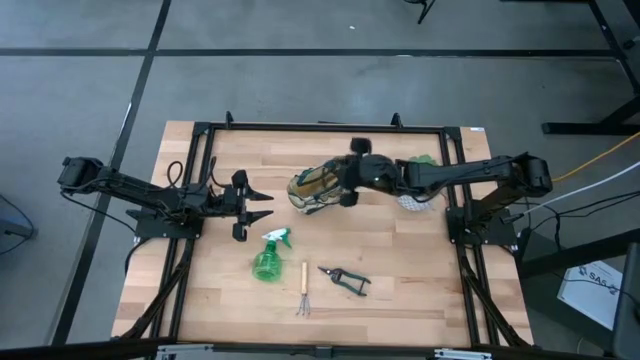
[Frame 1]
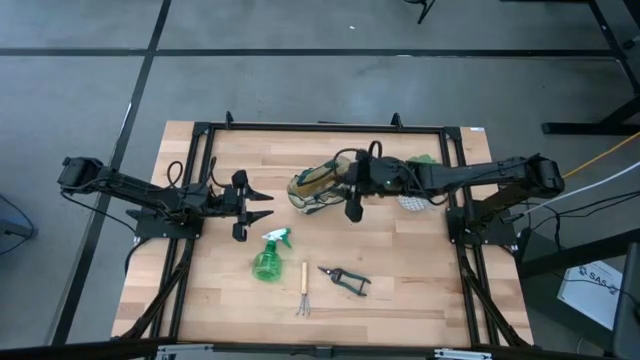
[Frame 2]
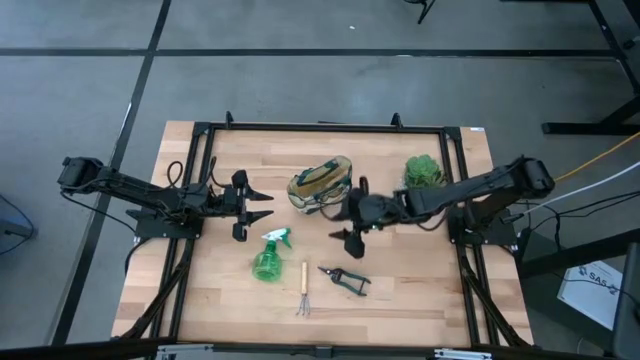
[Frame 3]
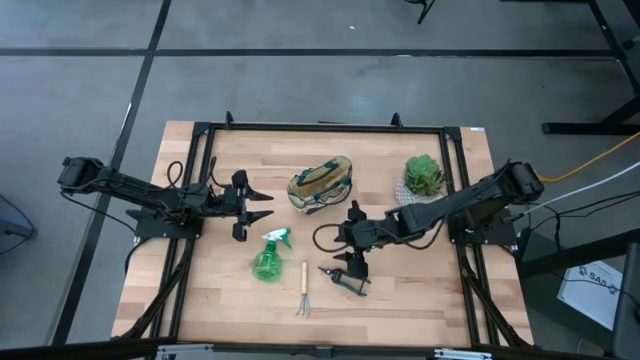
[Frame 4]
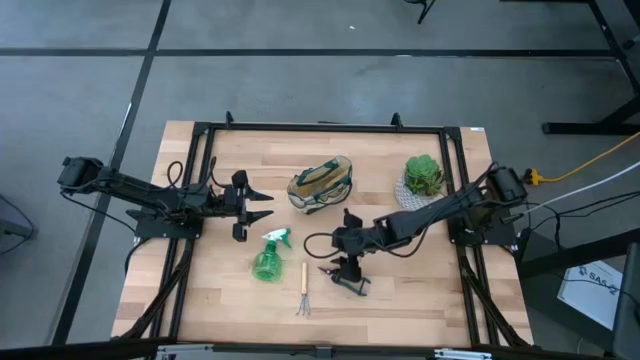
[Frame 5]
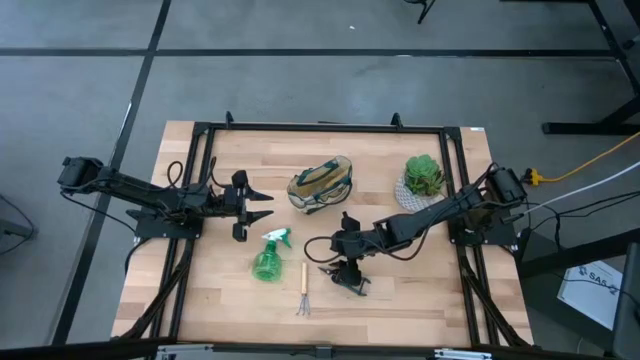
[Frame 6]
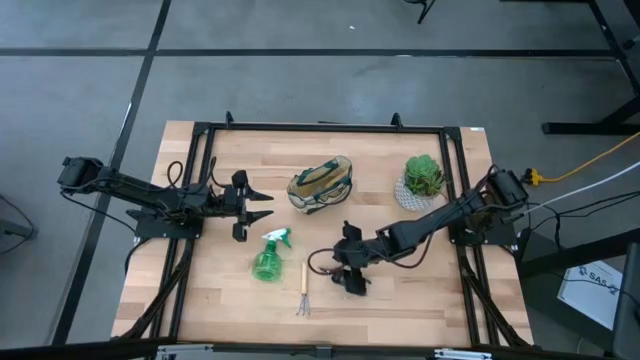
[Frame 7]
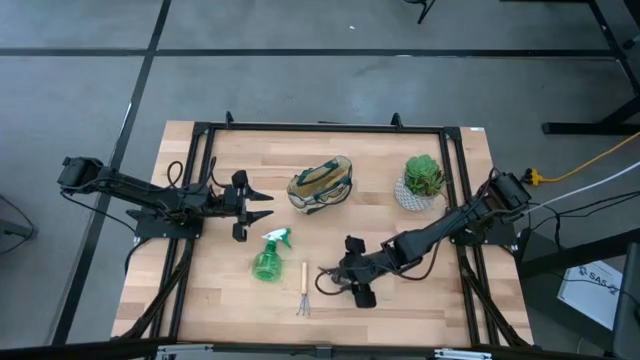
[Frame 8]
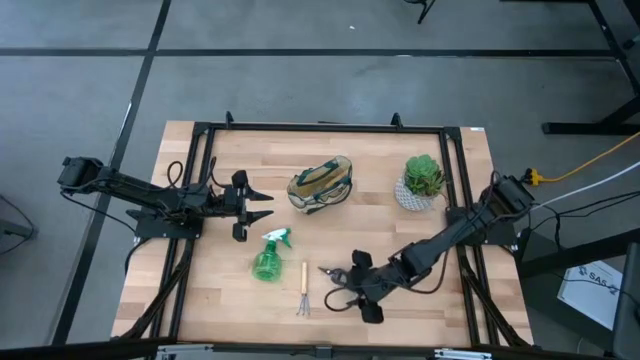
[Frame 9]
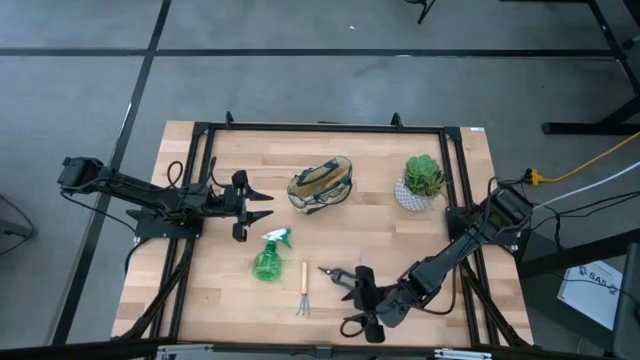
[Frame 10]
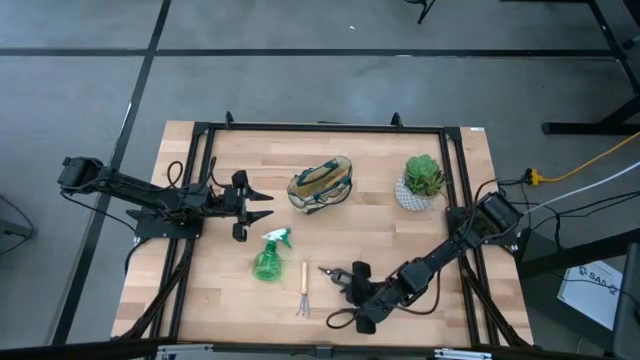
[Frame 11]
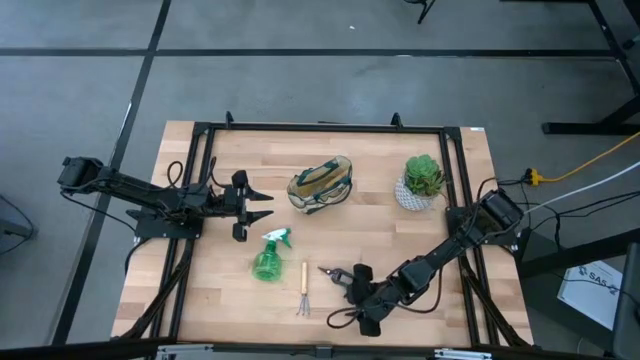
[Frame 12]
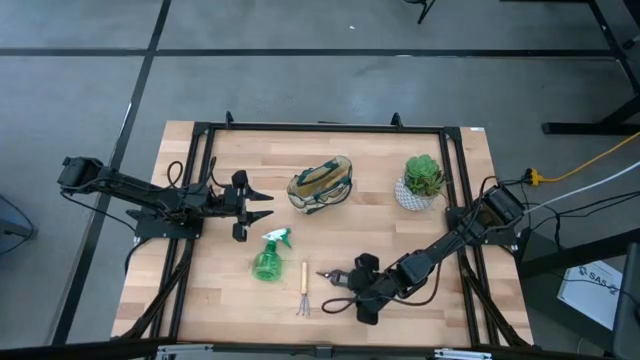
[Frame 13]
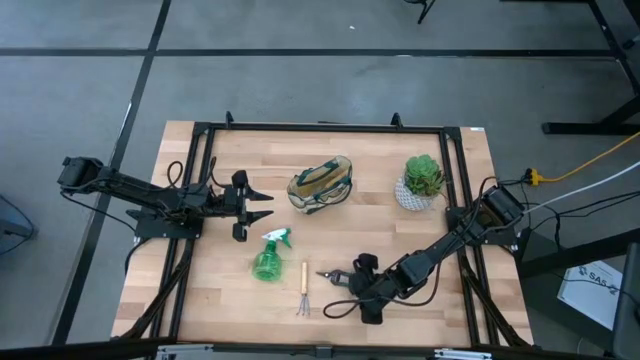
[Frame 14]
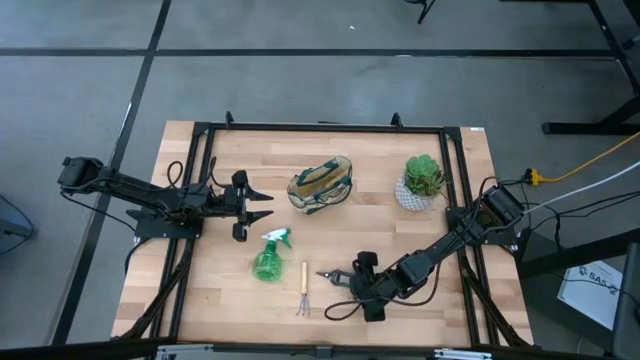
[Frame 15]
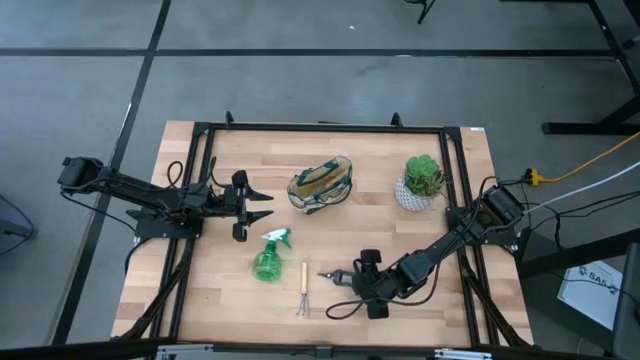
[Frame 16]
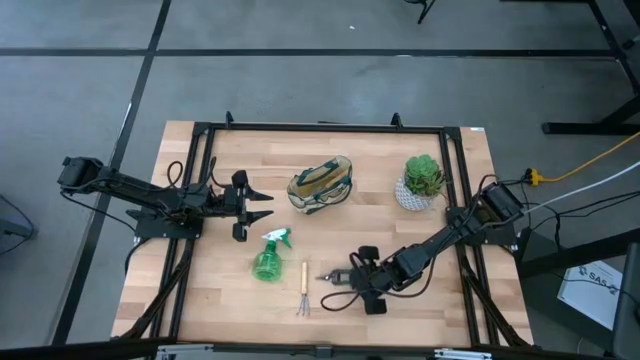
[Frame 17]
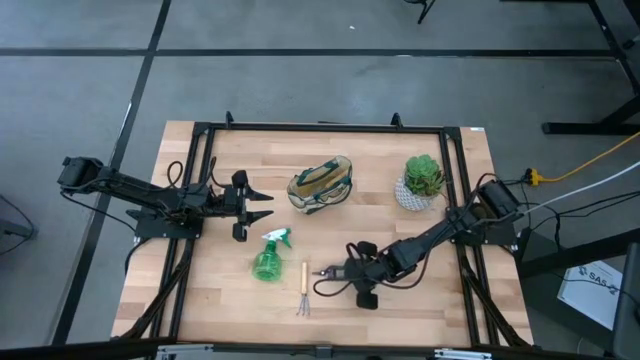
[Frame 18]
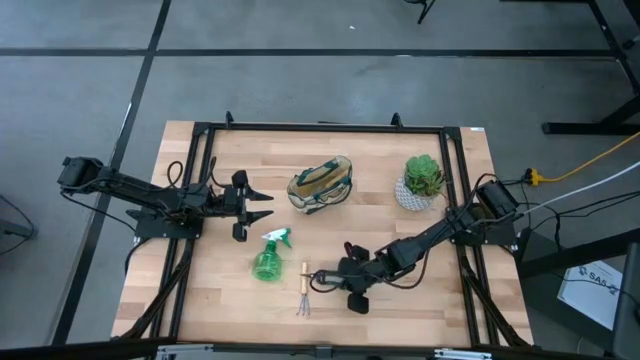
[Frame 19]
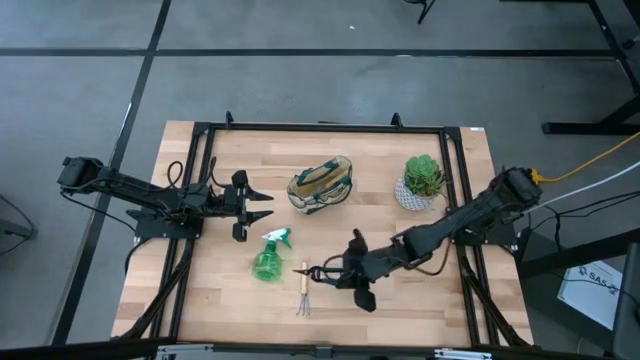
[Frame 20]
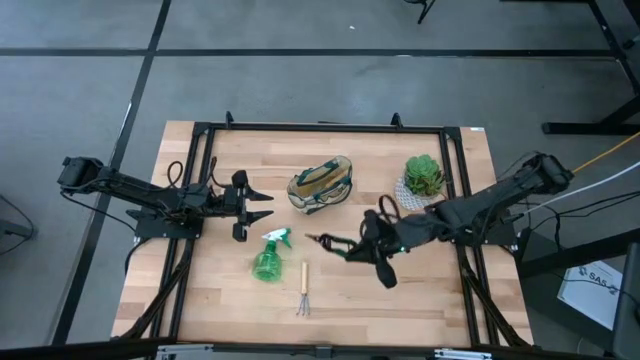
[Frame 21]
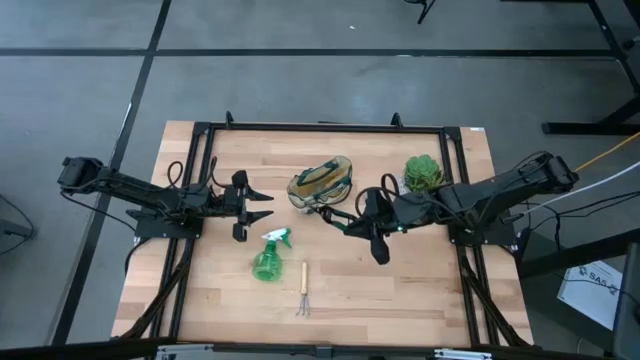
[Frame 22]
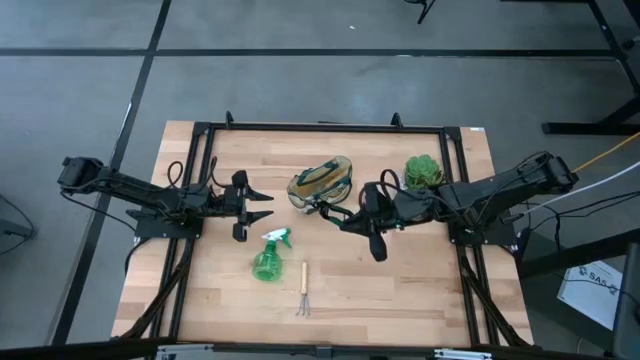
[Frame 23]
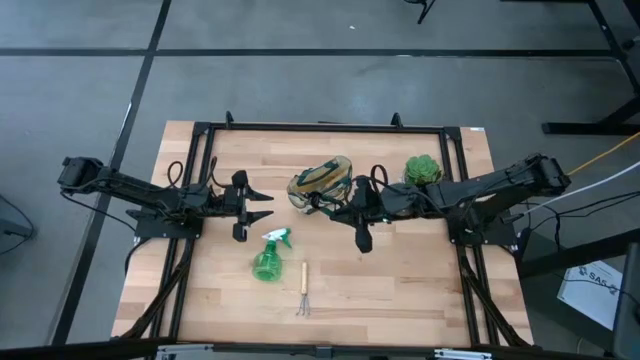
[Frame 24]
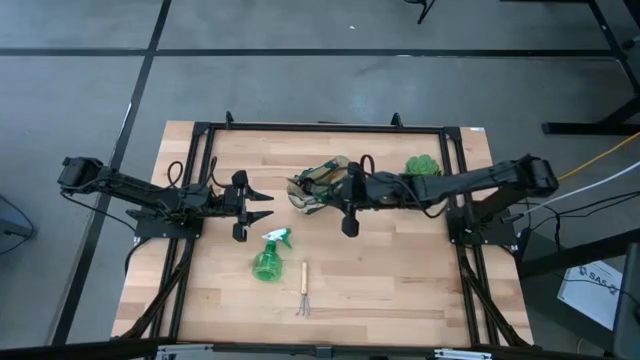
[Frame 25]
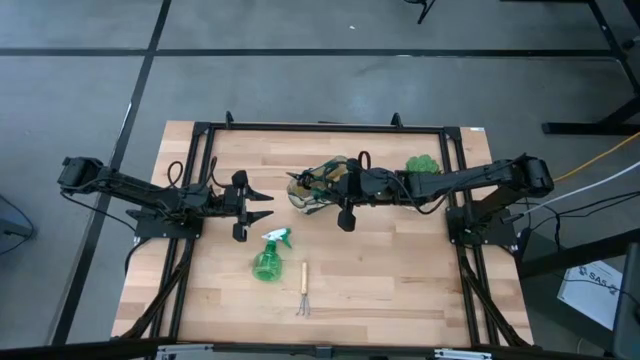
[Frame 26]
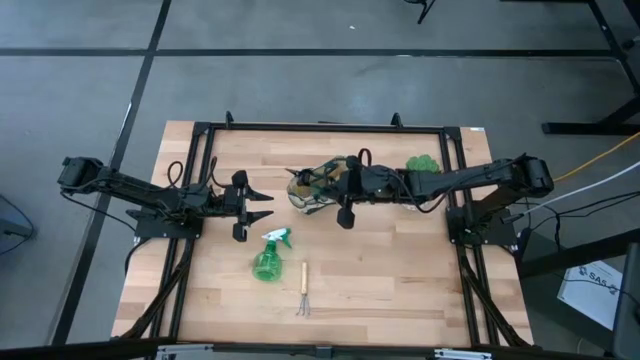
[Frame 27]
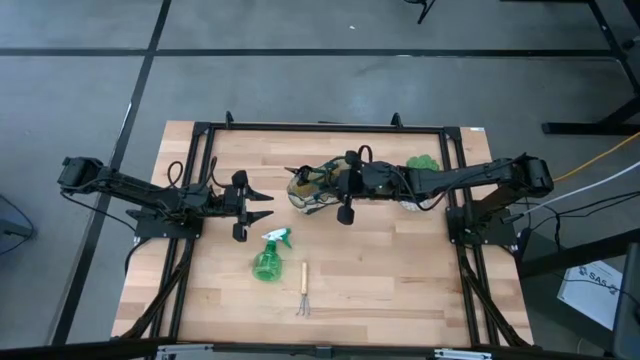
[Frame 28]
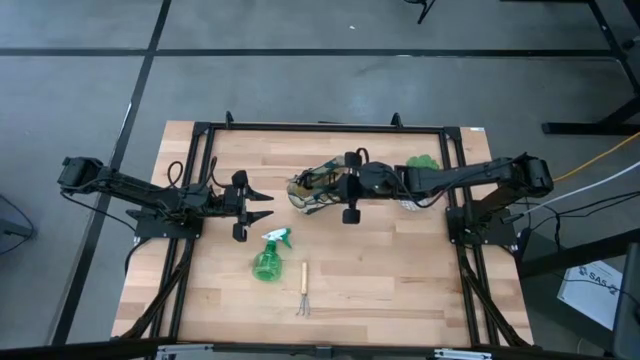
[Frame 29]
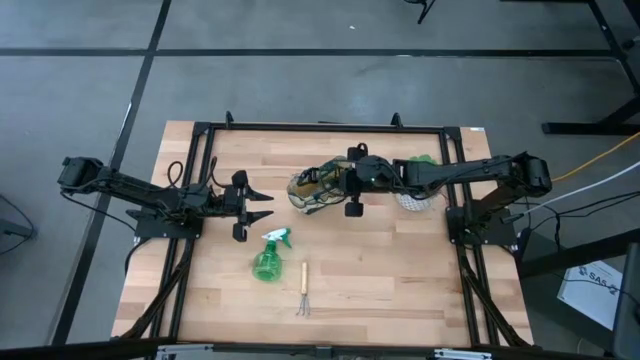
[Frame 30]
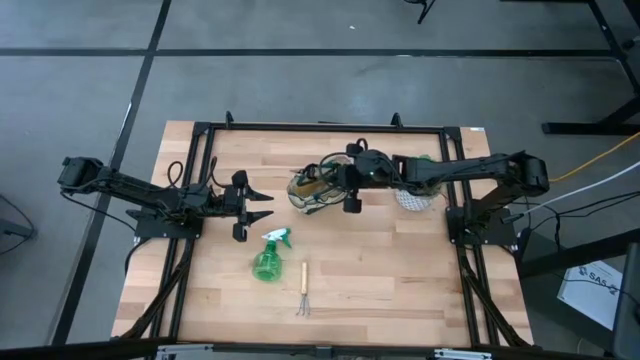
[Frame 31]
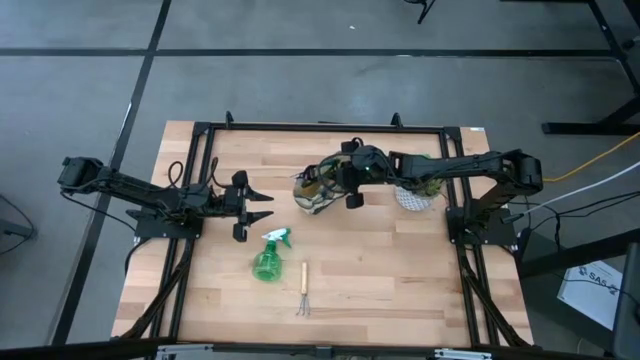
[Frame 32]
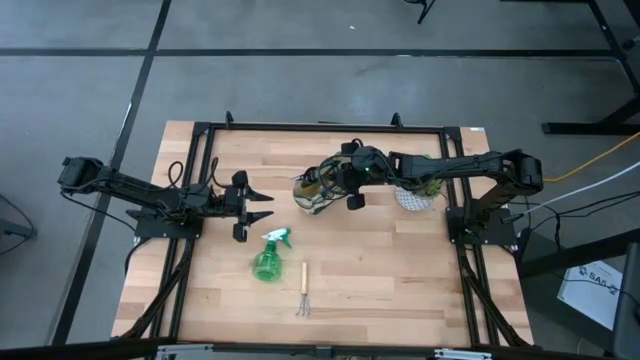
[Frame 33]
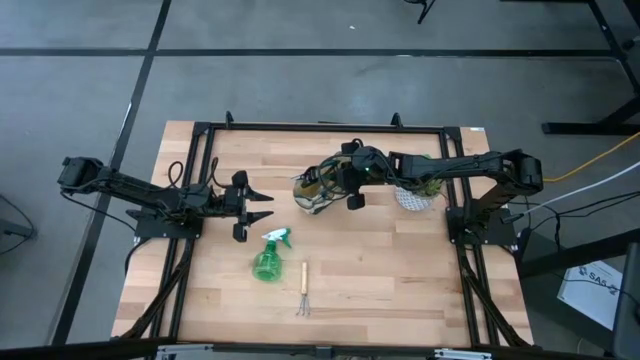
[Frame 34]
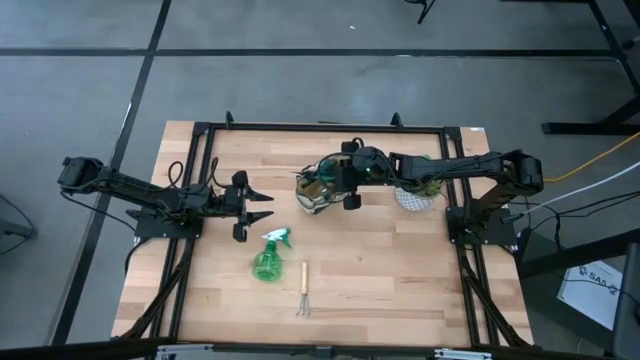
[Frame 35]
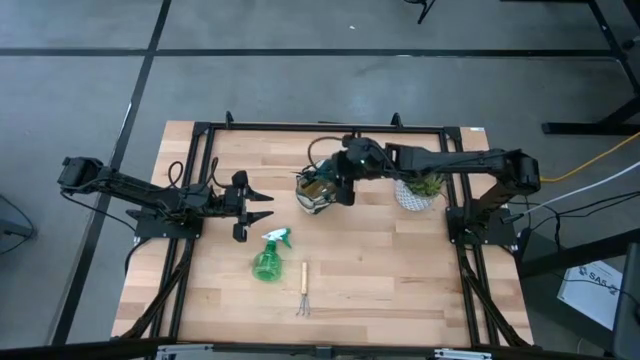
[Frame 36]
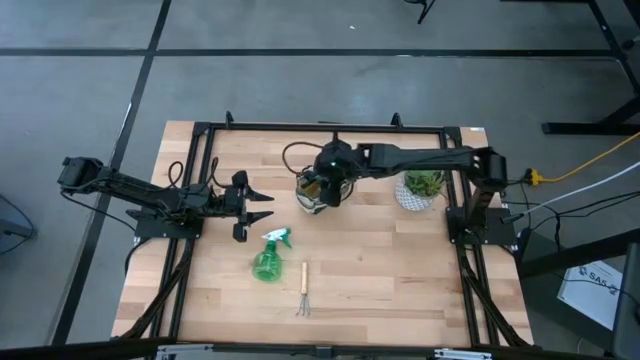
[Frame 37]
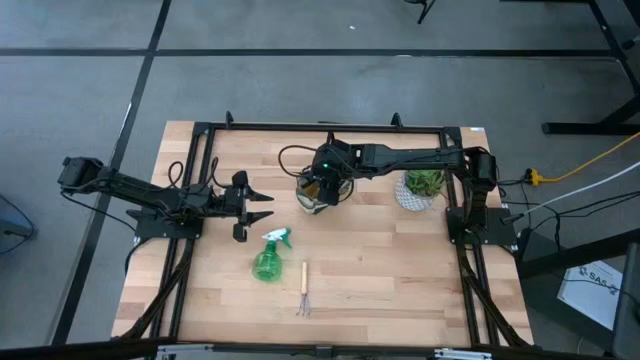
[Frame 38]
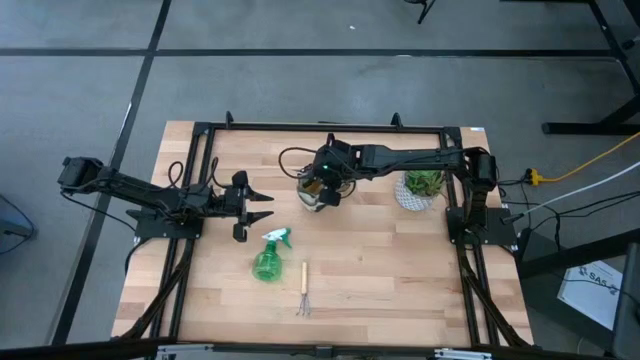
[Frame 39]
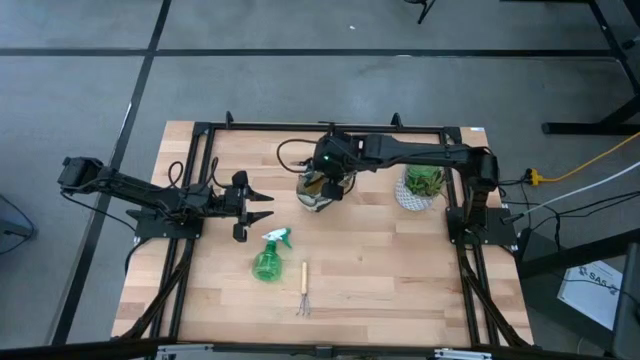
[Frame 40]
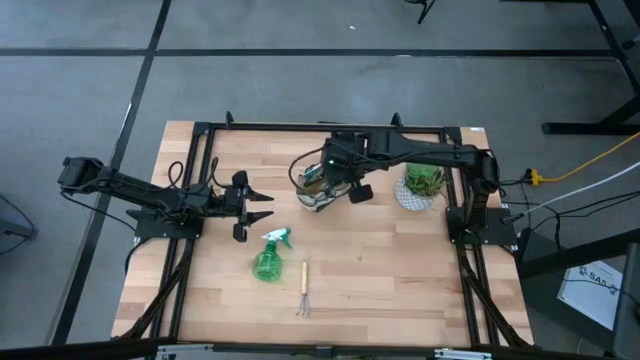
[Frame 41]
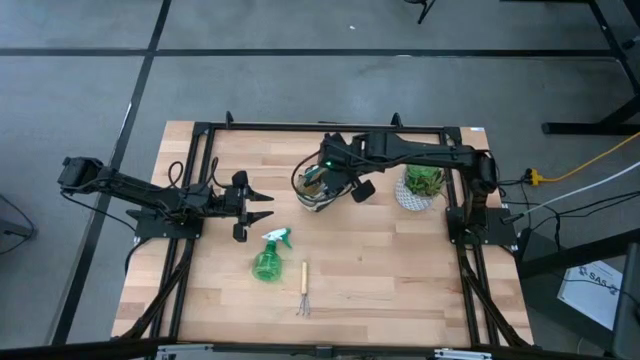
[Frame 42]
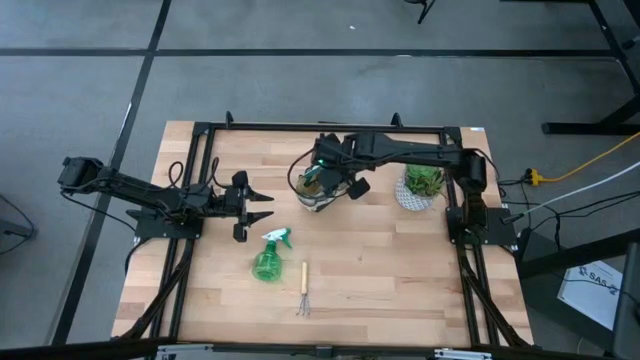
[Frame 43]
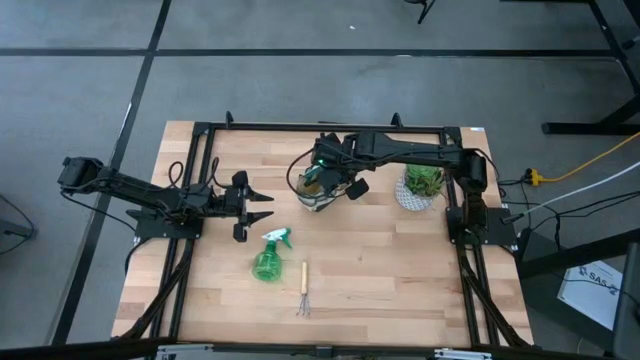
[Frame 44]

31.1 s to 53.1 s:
Task: Pick & Place Garden tools in Gardening bag
Put the shear scissor into the gardening bag
